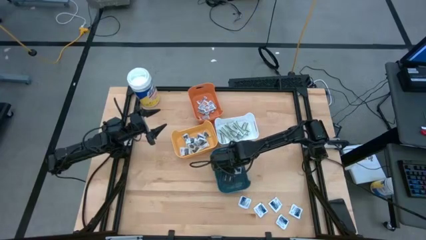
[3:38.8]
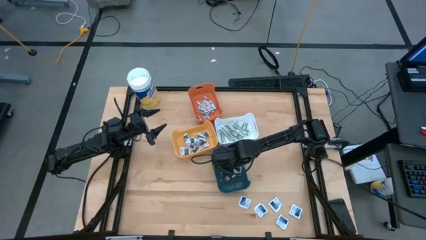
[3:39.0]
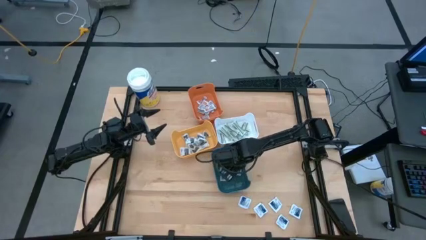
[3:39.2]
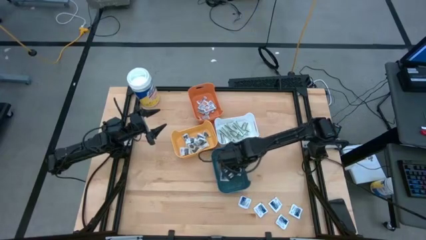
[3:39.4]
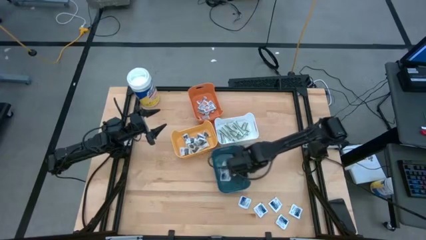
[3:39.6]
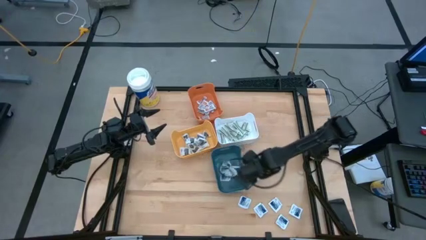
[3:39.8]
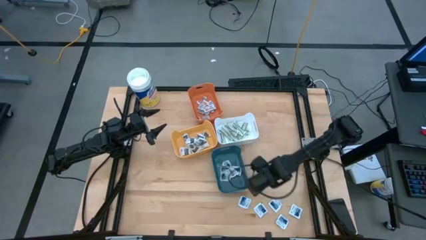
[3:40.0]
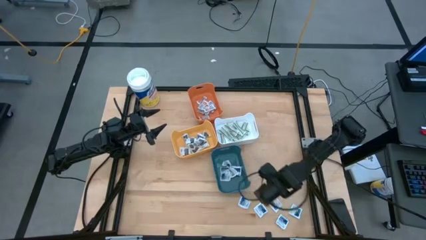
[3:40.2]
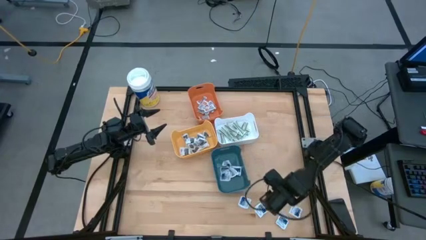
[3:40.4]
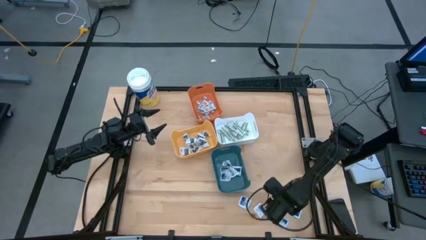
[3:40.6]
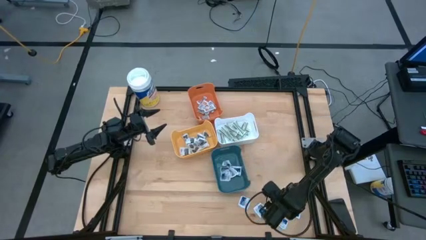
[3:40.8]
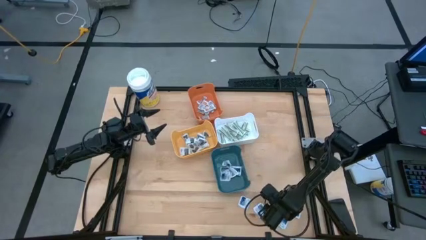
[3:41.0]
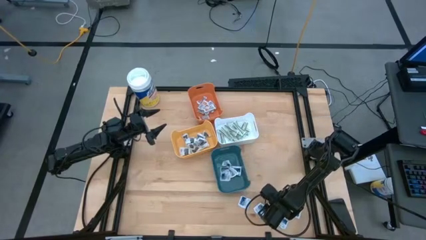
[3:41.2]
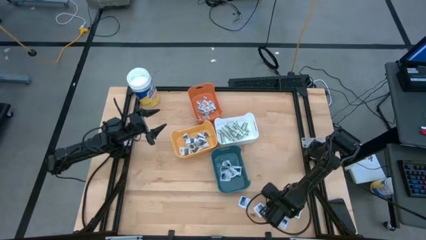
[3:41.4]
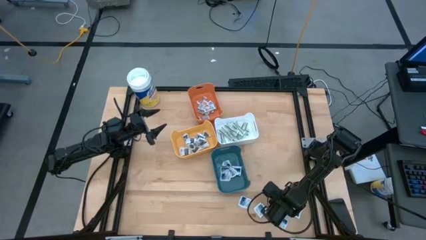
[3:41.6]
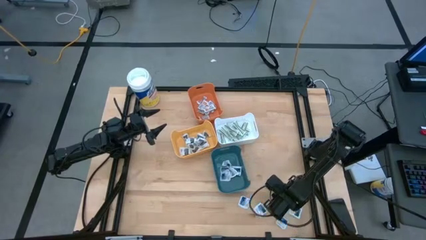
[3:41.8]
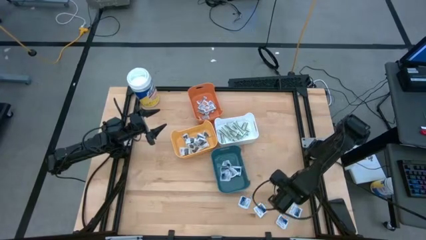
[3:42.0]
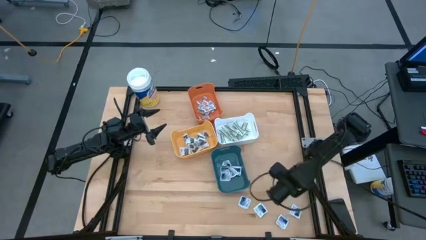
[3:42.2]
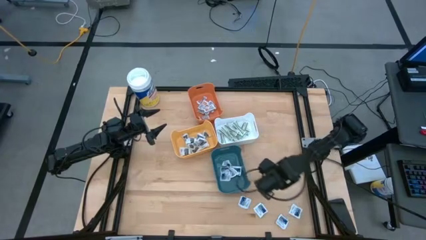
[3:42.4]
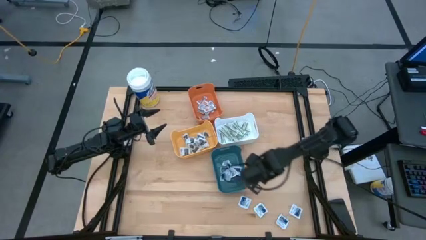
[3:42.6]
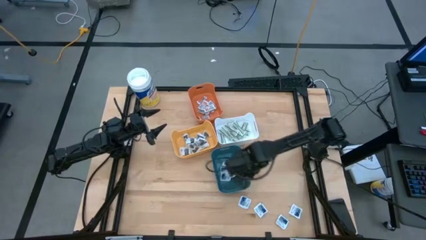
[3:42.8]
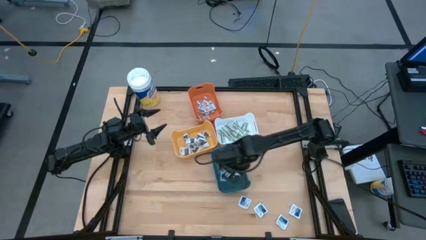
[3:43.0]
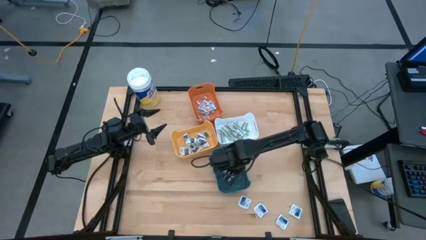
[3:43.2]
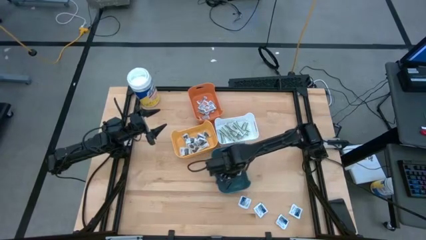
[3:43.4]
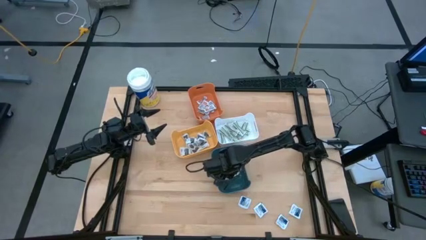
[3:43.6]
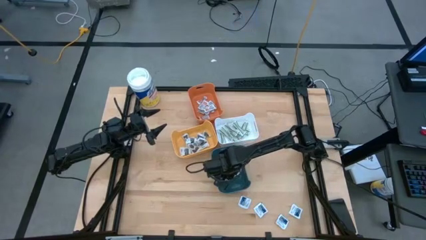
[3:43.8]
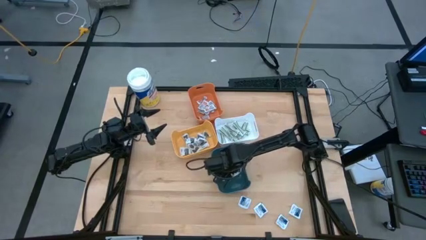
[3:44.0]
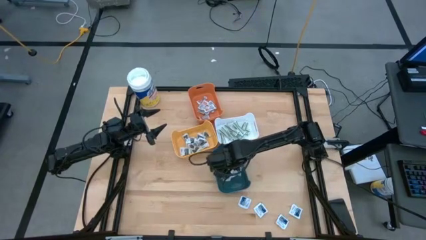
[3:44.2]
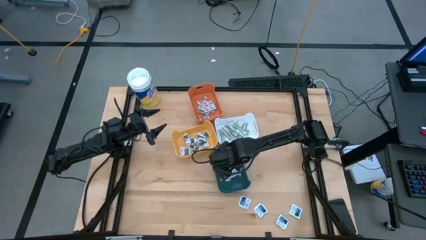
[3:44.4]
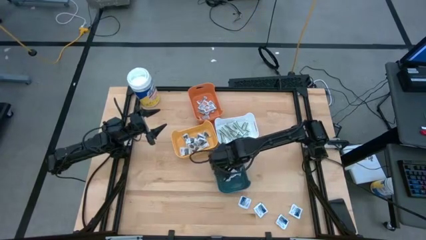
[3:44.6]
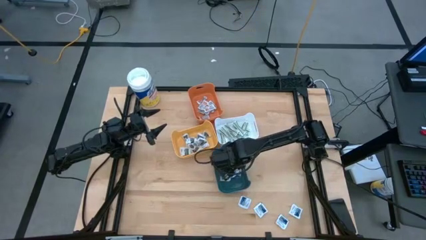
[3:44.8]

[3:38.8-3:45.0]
Task: Pick & Place First Aid Supplies
Put the blue alcohol pad into the blue bin

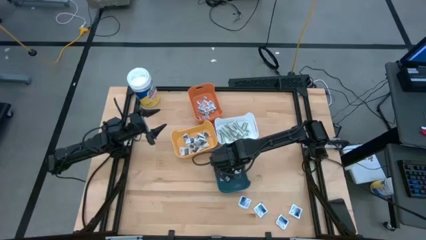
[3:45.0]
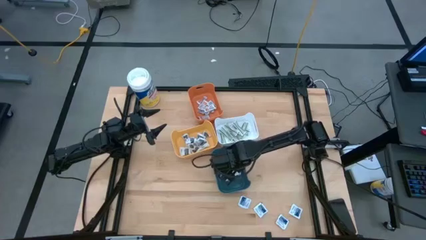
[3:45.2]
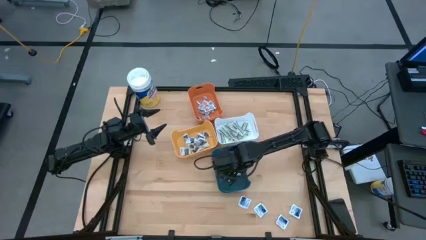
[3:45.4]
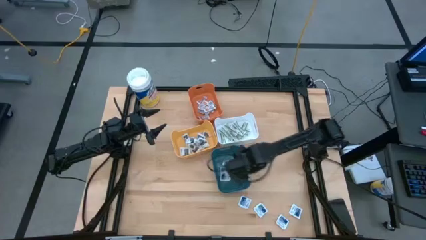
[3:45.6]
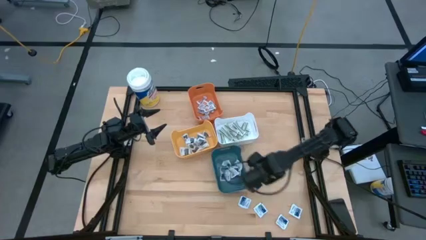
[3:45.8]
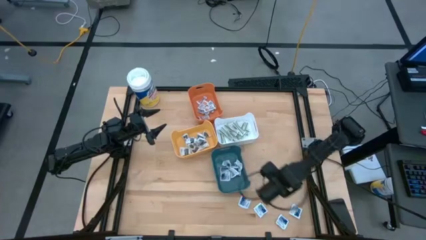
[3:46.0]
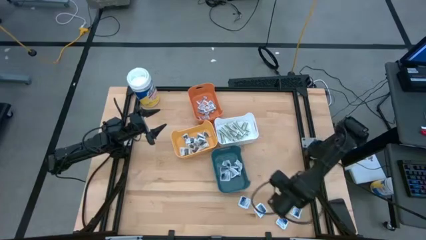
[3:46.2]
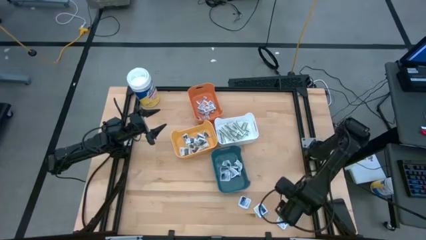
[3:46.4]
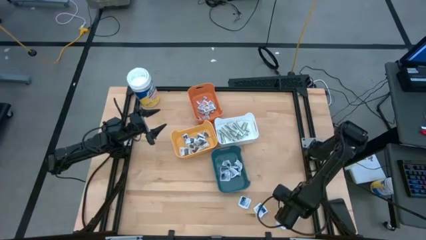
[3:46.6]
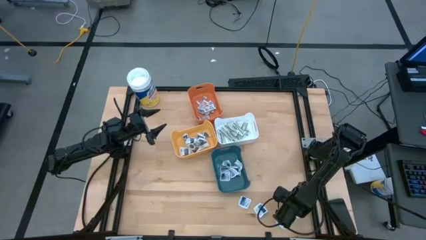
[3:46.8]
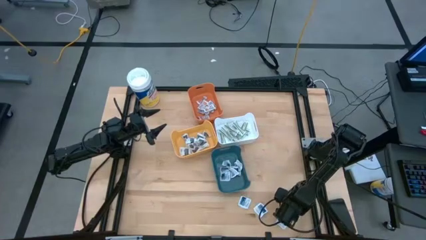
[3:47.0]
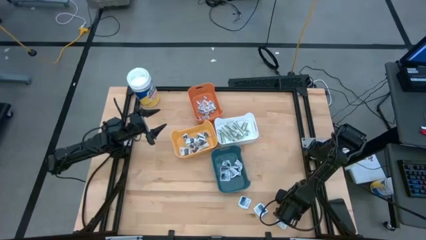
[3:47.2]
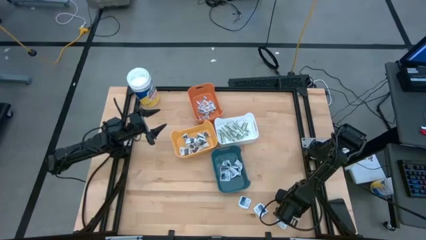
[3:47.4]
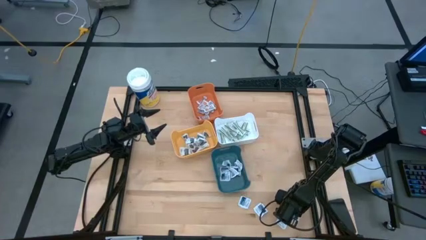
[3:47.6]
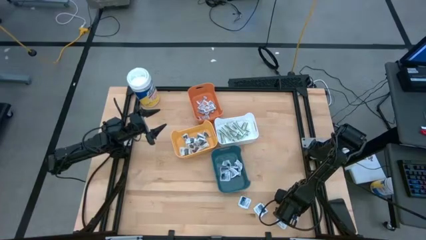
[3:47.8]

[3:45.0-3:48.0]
Put the blue alcohol pad into the blue bin

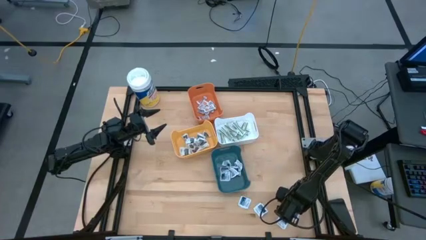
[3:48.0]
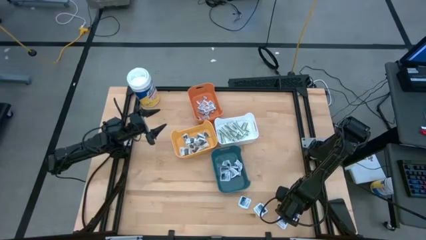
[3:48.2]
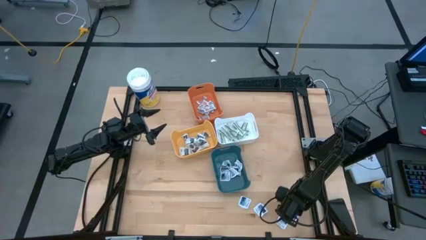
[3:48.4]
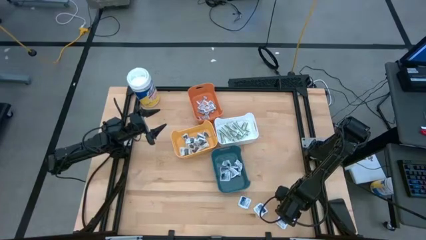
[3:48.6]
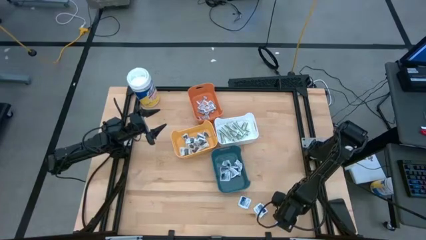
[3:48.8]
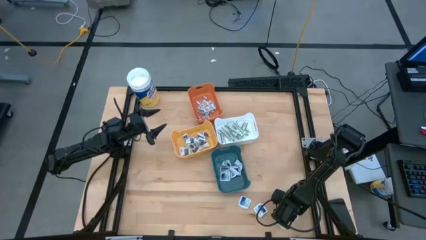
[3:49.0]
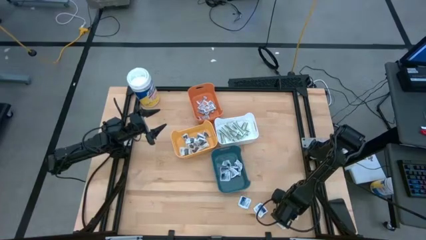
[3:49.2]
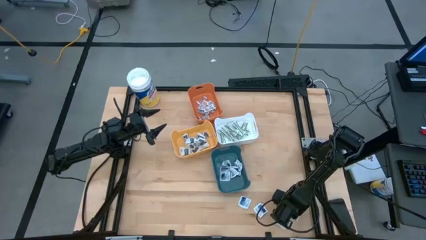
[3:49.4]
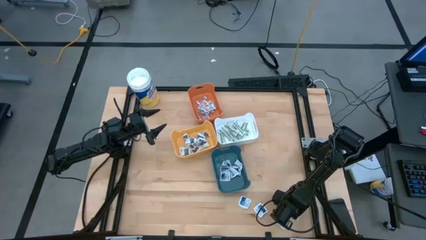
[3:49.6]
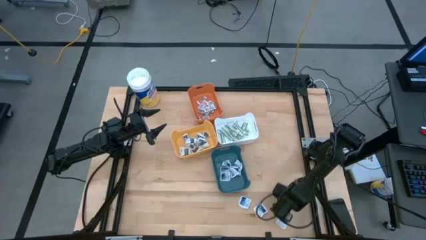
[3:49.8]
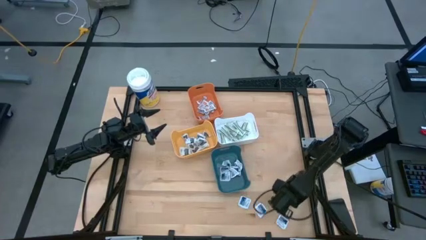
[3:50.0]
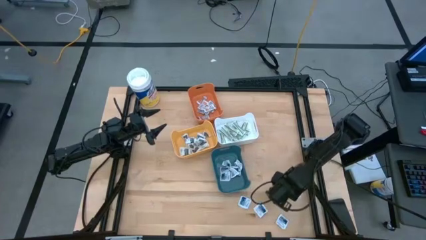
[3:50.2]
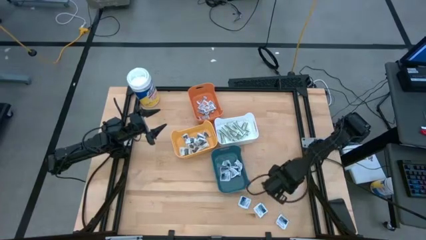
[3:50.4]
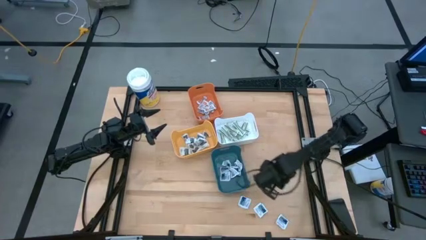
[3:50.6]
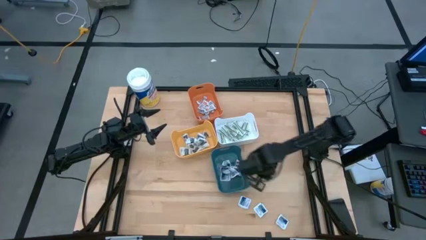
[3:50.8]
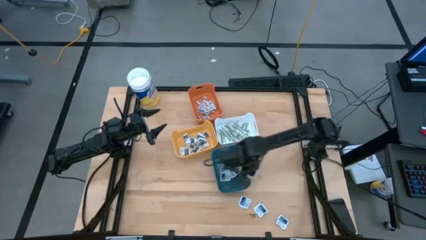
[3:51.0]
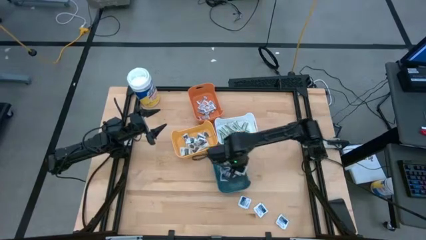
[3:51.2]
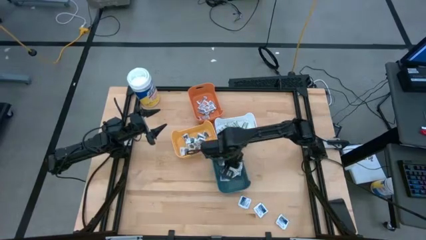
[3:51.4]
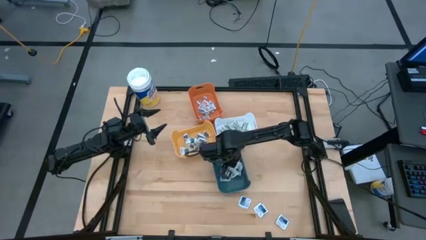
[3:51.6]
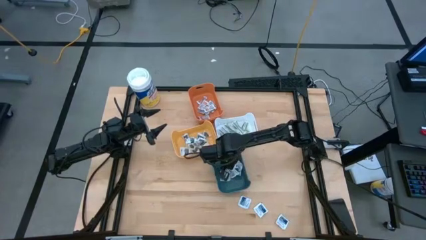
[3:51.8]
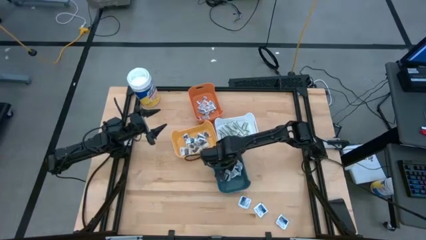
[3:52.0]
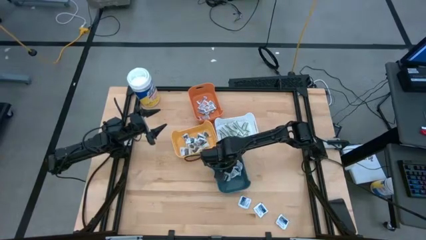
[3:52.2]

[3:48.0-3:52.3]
Put the blue alcohol pad into the blue bin

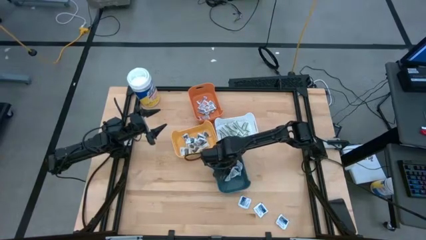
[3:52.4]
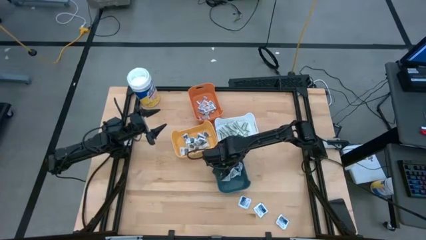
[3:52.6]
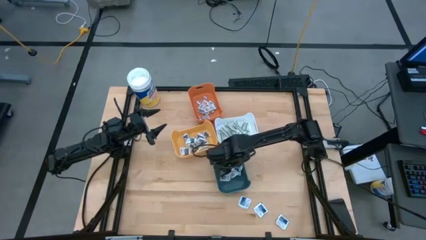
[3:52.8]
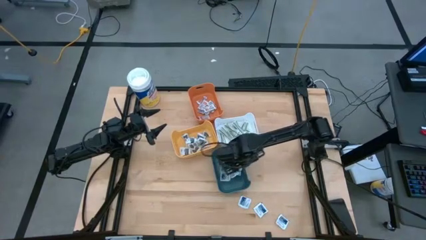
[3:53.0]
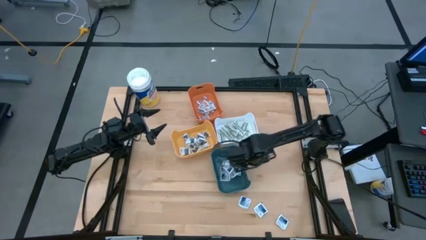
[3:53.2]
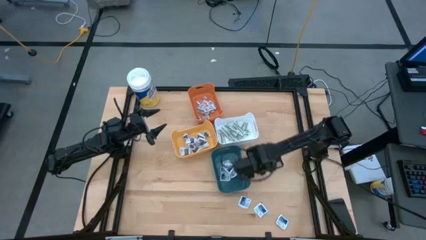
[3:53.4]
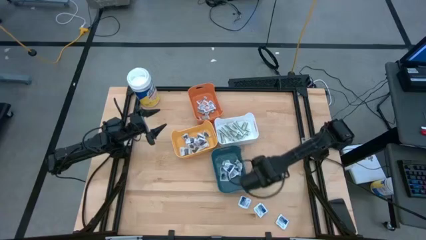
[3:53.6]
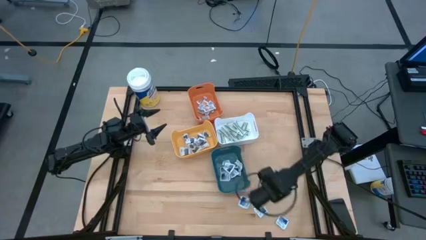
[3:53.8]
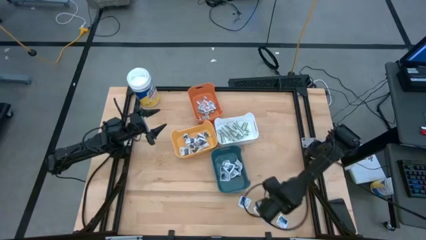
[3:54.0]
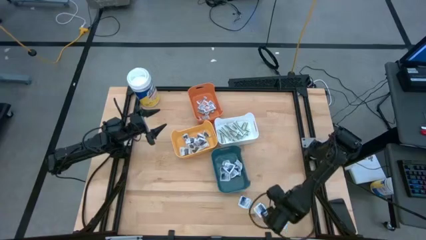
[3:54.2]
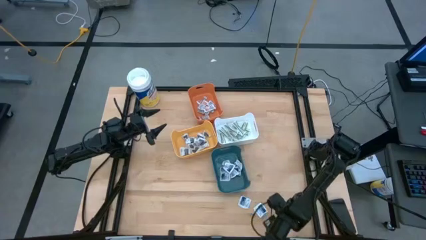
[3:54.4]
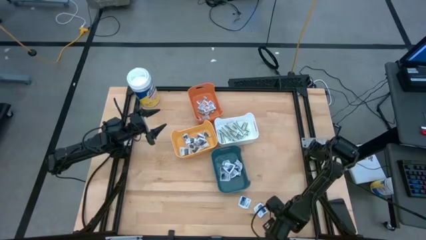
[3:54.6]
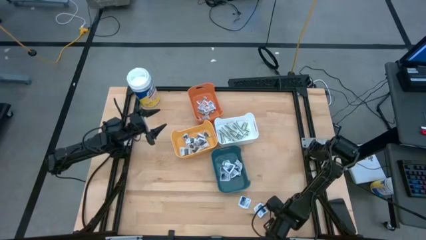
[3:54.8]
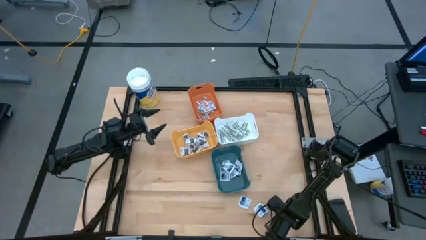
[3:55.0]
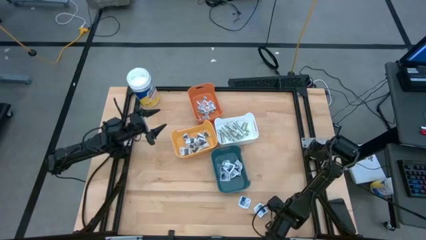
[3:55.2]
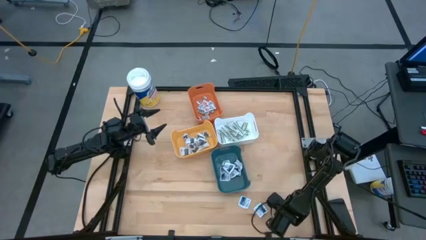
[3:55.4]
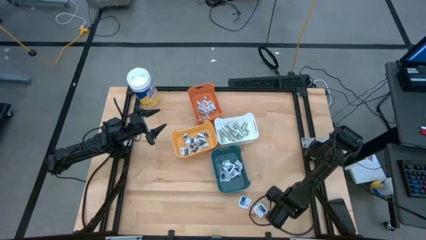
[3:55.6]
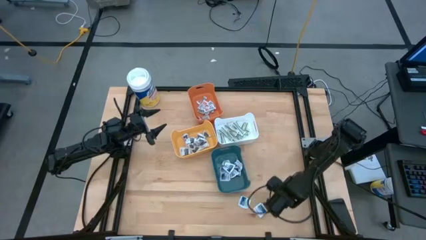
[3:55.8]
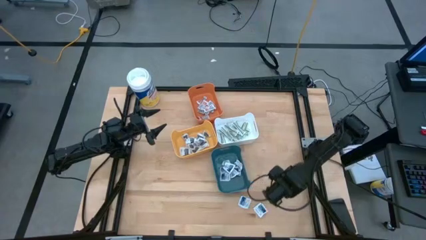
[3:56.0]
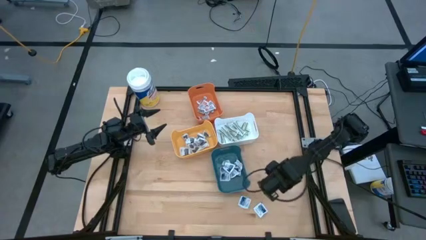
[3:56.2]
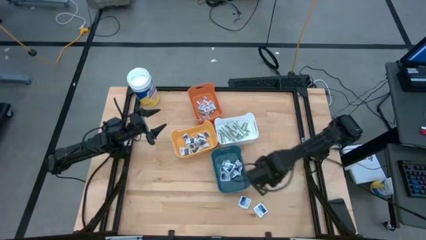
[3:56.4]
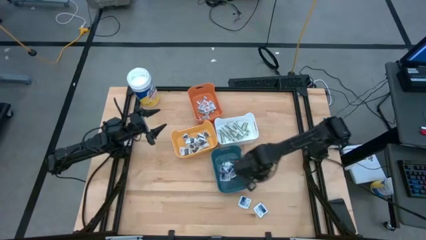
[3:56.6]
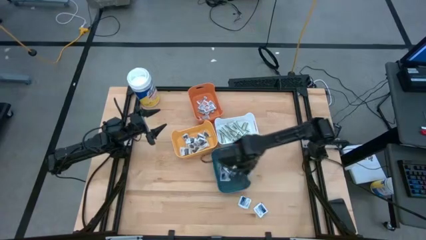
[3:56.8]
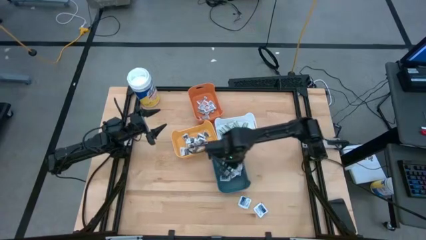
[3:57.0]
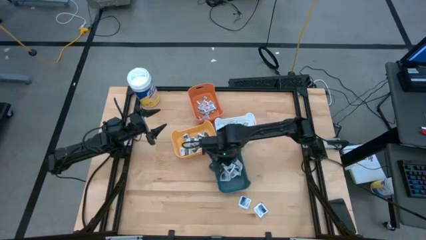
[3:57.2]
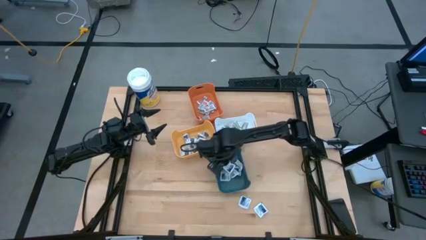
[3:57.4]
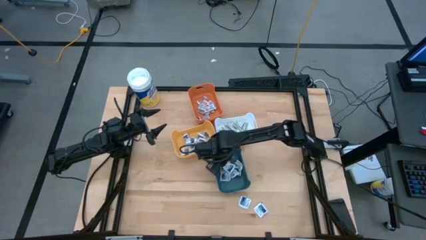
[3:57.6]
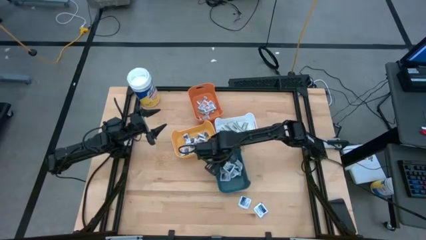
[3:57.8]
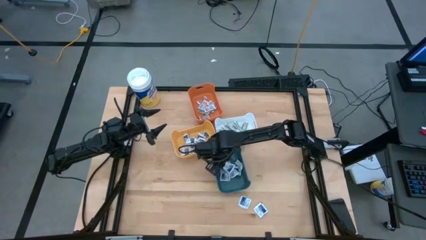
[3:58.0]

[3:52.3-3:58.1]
Put the blue alcohol pad into the blue bin
